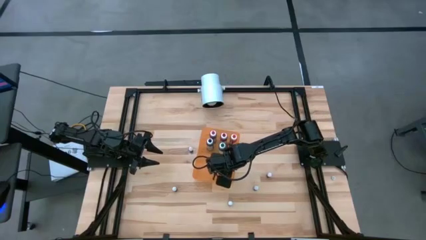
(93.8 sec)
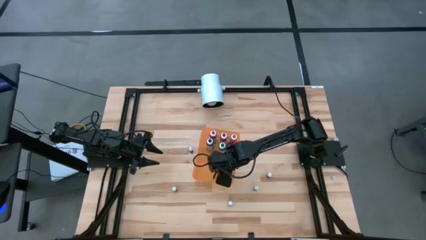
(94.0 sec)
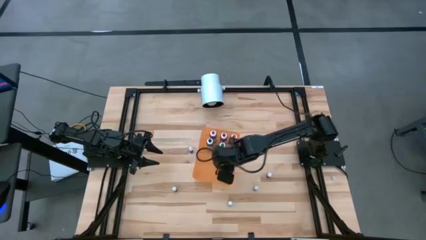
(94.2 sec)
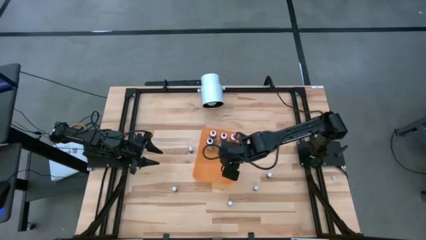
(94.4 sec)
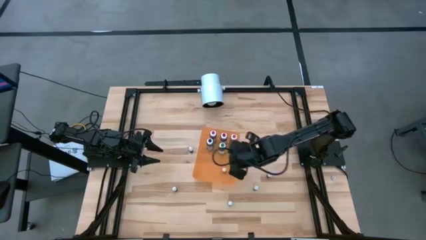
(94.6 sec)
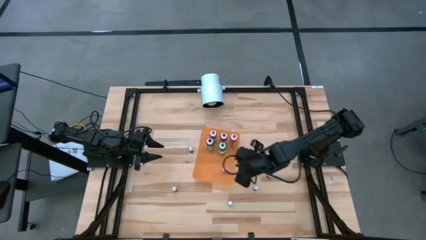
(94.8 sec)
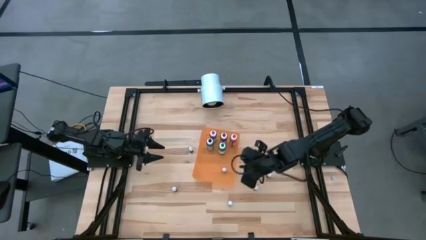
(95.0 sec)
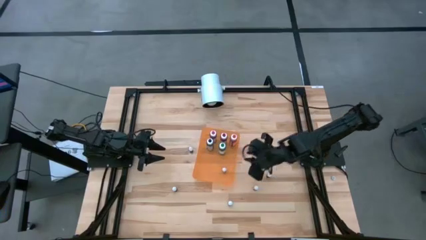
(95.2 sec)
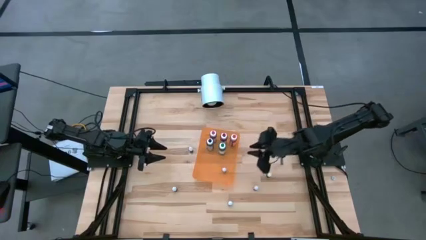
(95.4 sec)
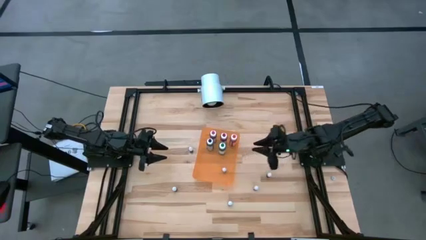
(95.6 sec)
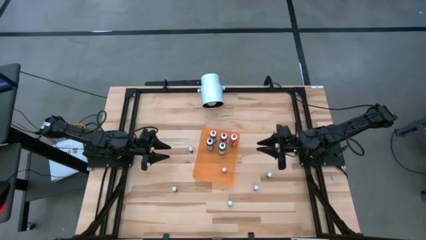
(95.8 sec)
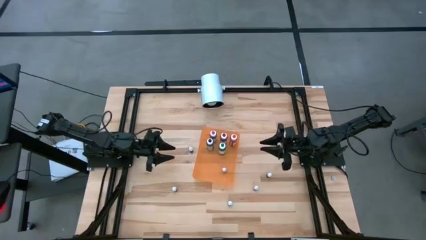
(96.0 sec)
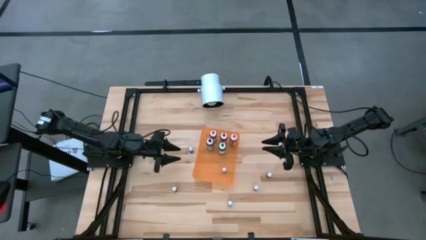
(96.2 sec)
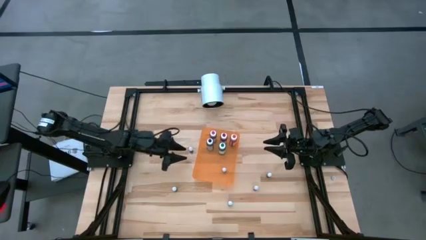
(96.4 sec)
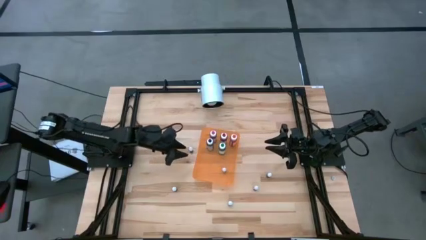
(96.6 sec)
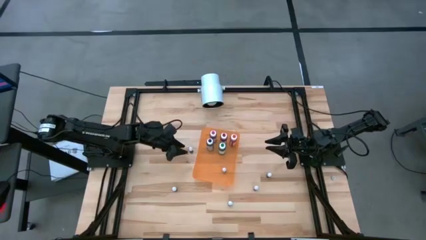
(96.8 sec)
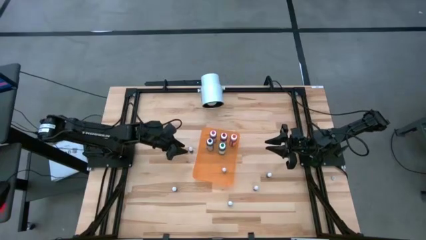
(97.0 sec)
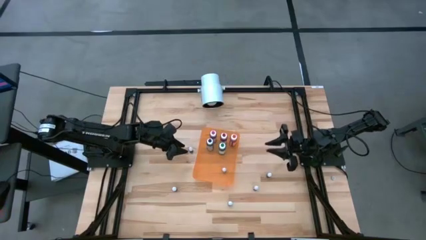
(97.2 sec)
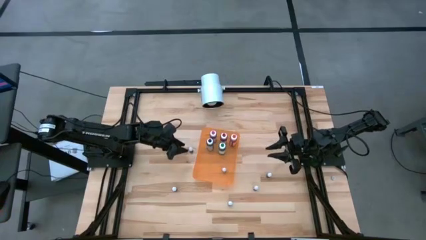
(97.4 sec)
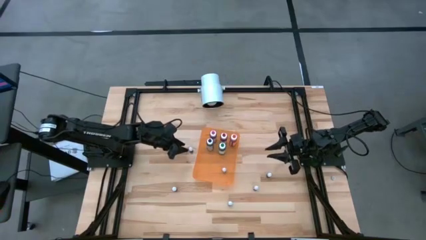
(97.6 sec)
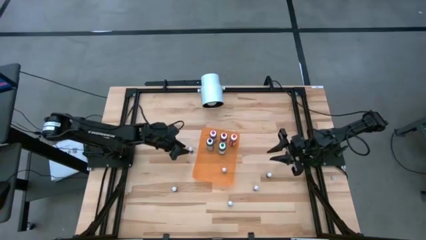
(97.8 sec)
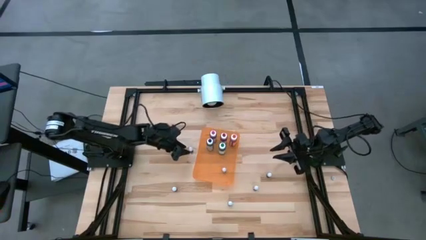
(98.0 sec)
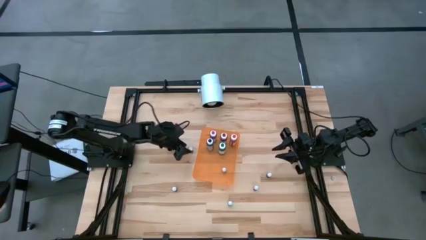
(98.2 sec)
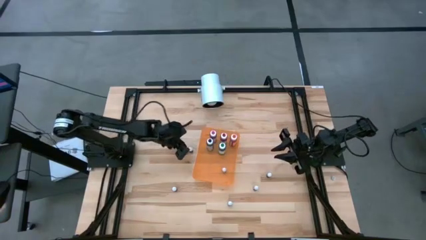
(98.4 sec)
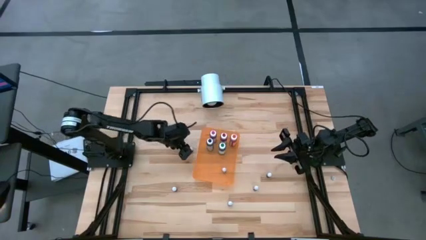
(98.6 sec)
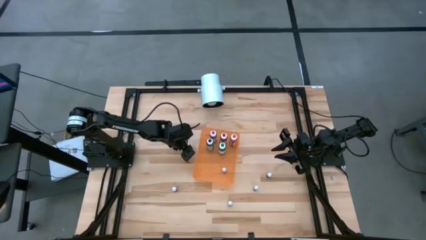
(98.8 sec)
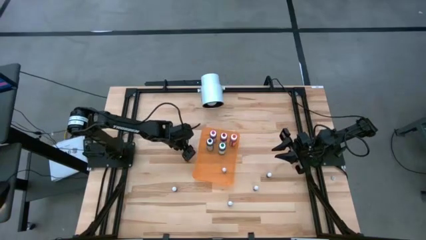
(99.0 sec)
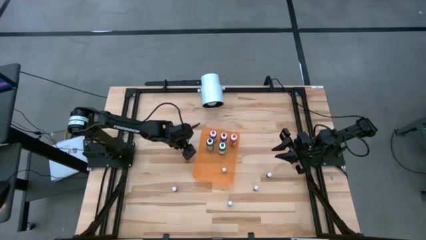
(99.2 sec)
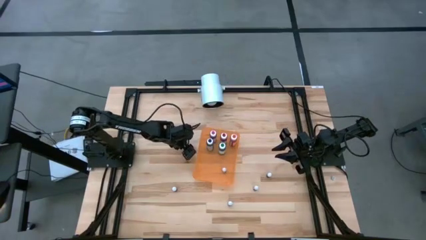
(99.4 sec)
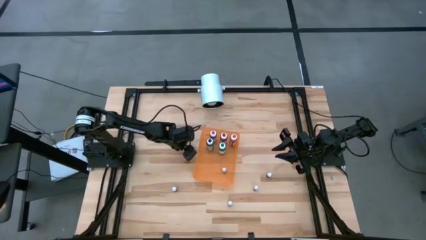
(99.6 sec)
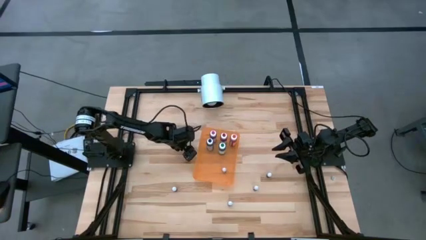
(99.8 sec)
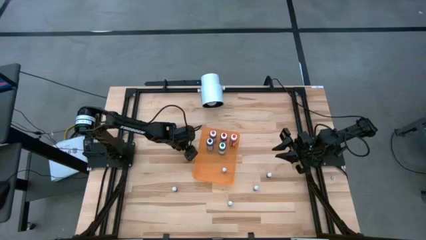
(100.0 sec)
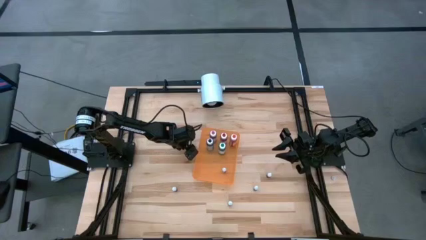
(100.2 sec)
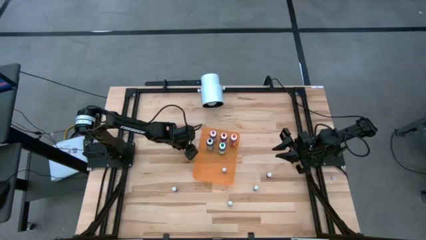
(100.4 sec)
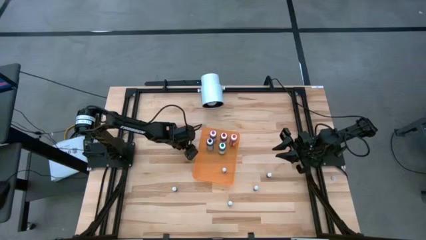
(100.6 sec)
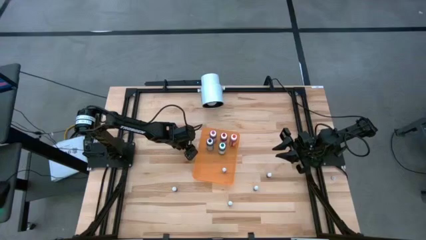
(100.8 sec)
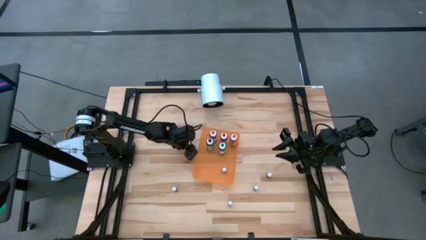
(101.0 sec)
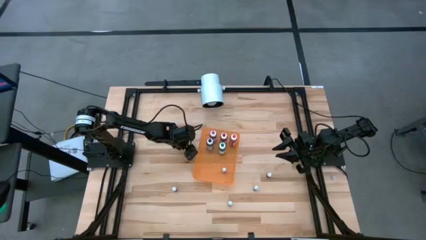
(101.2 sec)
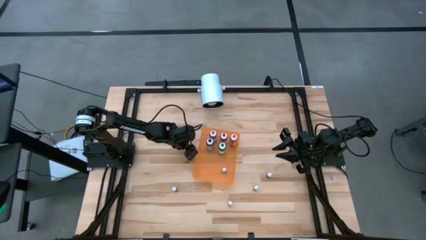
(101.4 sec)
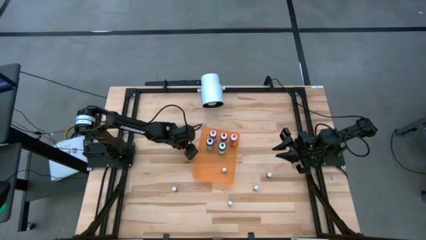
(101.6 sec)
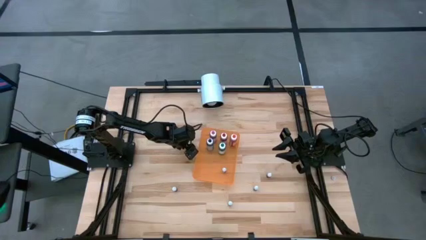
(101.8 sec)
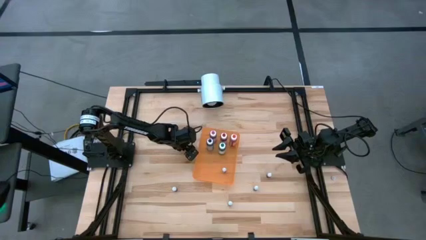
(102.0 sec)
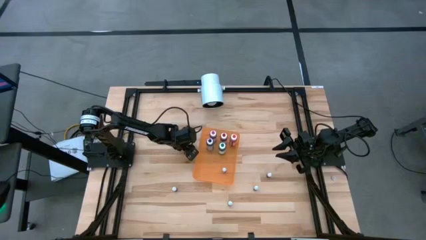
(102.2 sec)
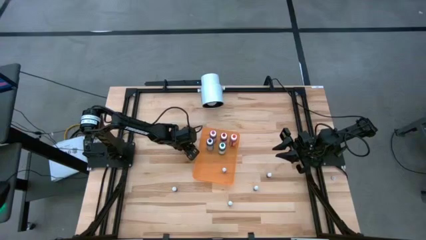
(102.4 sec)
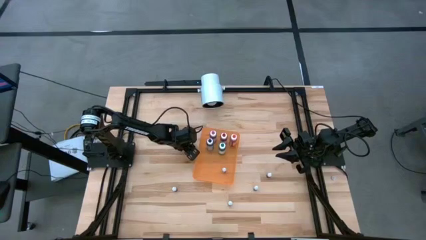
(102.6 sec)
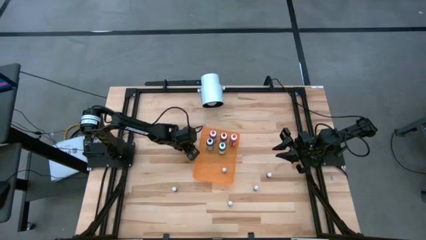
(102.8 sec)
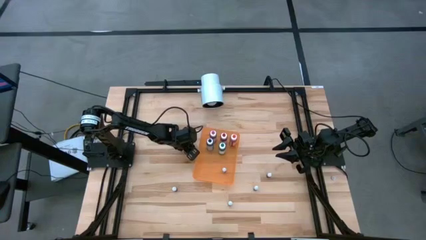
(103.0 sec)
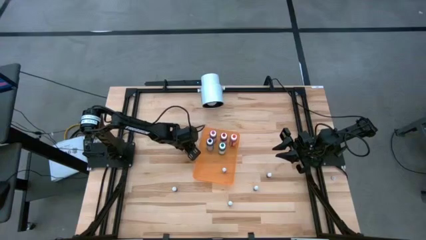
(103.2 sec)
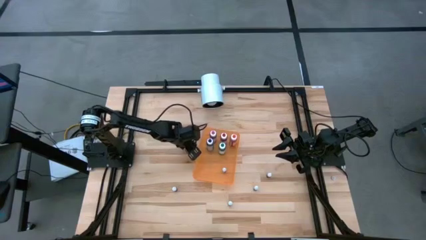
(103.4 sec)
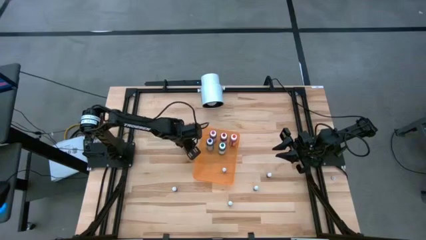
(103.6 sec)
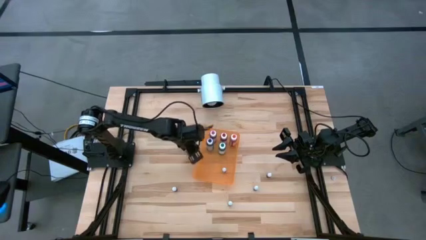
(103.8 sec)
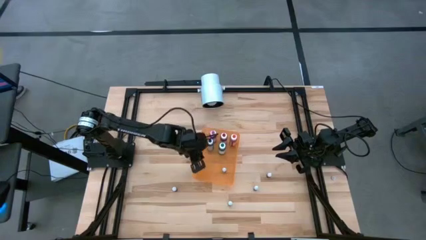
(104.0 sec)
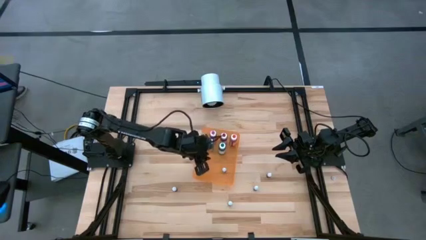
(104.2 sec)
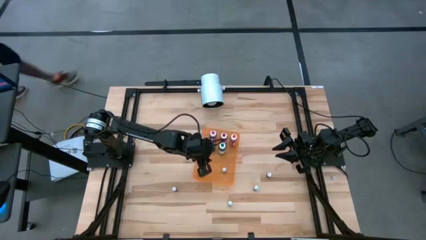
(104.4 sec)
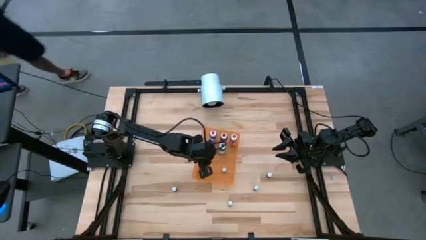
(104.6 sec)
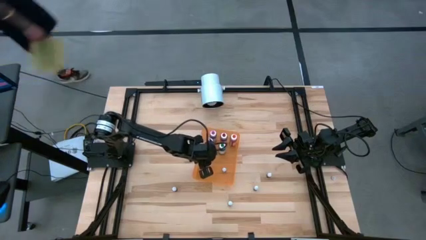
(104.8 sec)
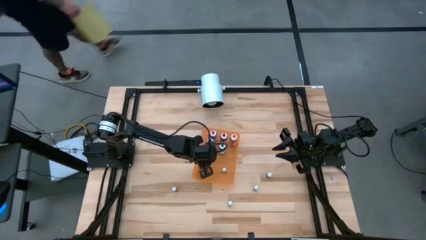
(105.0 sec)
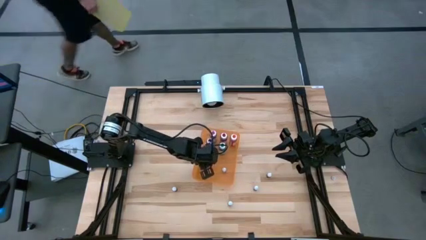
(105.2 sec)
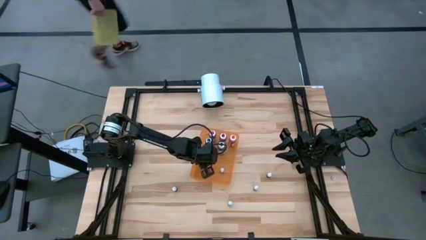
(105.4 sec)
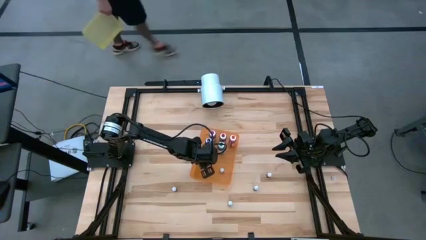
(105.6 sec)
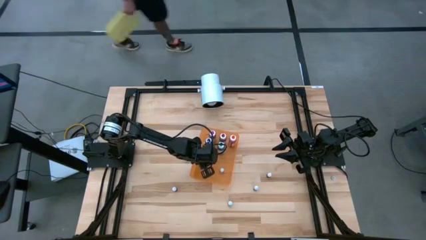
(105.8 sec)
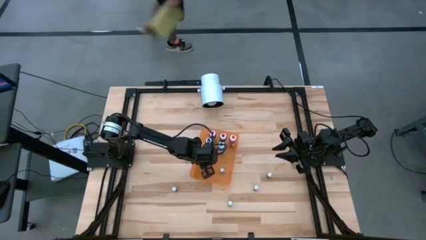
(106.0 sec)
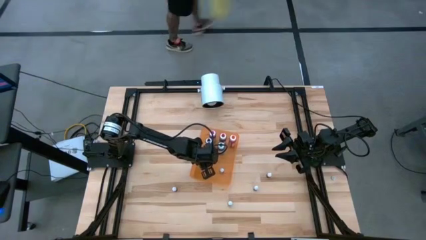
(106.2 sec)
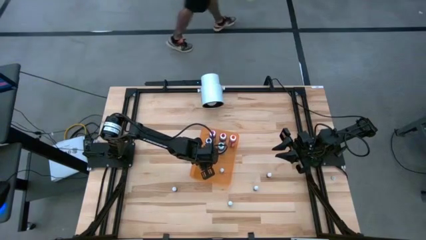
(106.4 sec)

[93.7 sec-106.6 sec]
Task: Pick & Place food coloring
Put the top small black food coloring bottle into the orange bin

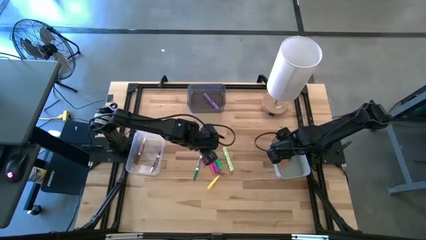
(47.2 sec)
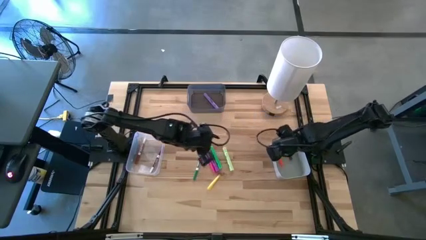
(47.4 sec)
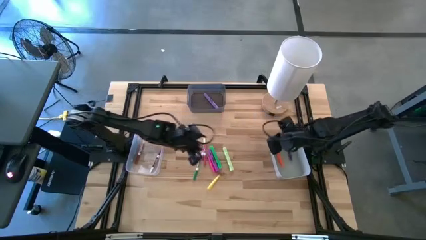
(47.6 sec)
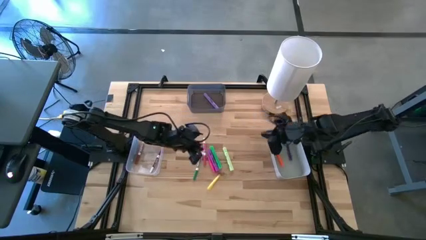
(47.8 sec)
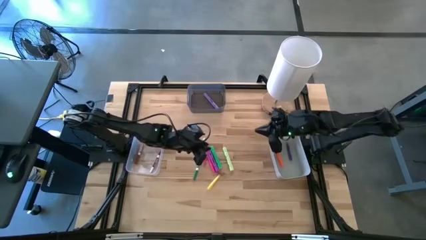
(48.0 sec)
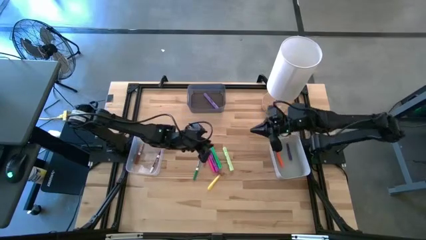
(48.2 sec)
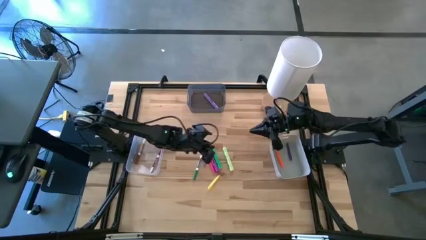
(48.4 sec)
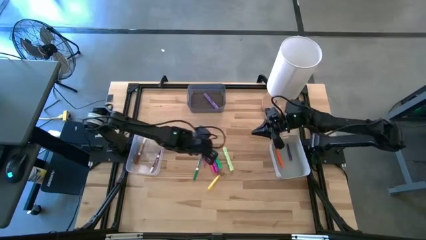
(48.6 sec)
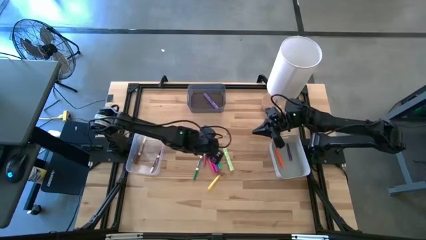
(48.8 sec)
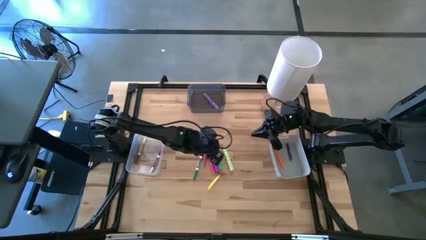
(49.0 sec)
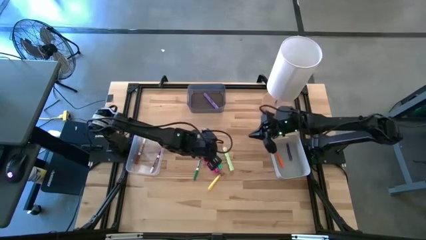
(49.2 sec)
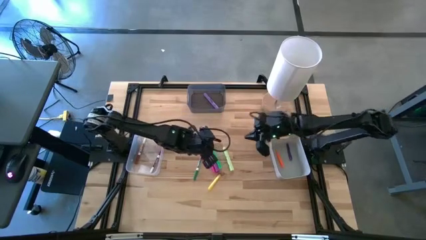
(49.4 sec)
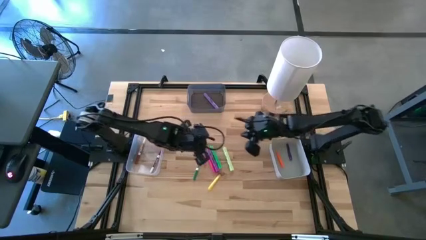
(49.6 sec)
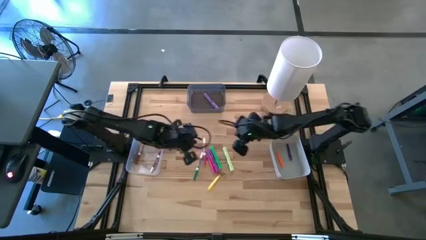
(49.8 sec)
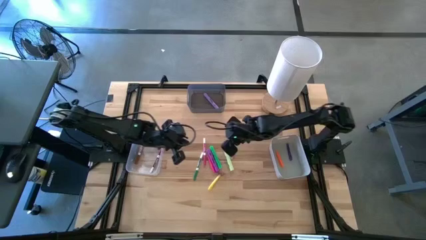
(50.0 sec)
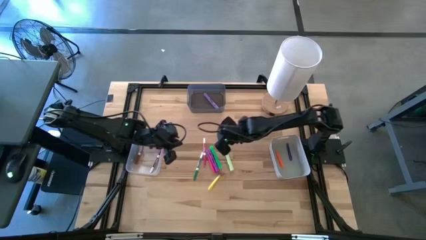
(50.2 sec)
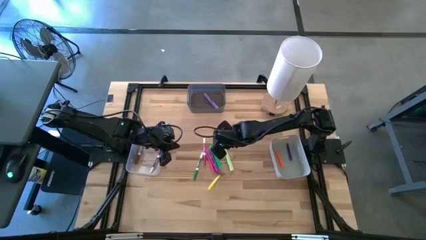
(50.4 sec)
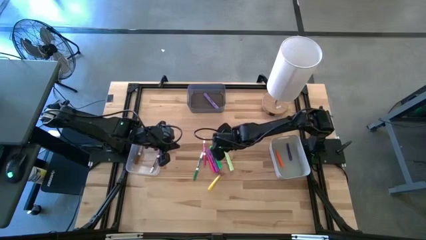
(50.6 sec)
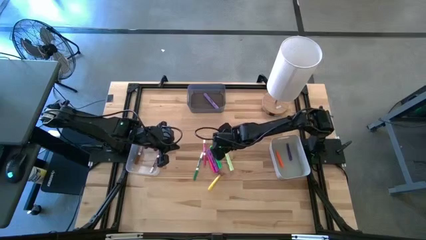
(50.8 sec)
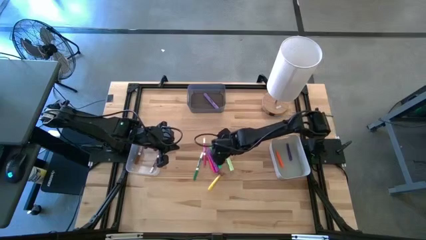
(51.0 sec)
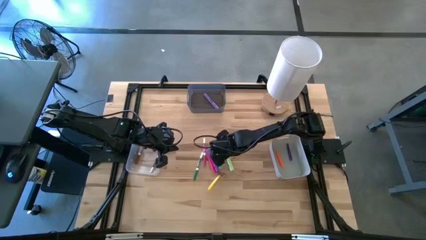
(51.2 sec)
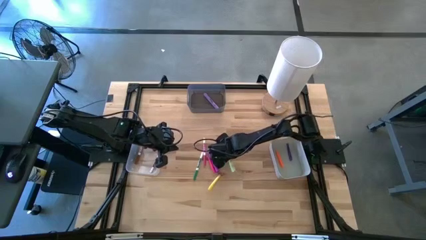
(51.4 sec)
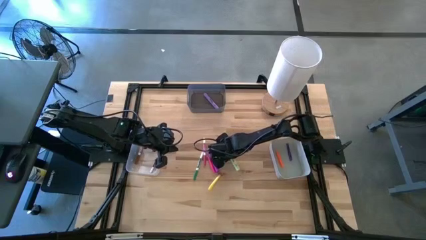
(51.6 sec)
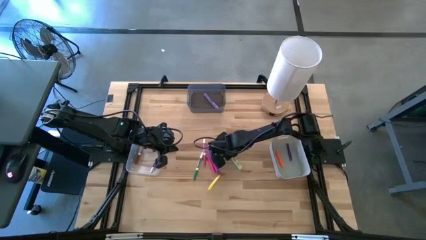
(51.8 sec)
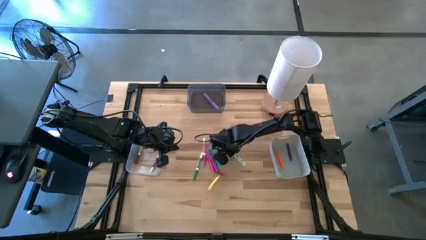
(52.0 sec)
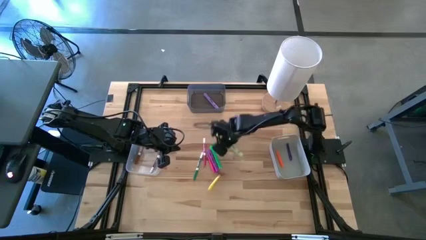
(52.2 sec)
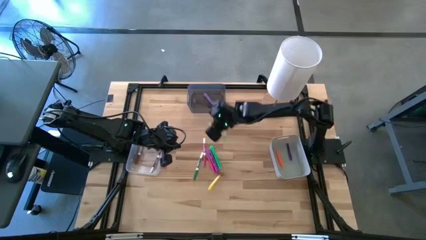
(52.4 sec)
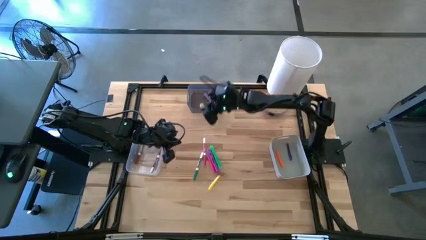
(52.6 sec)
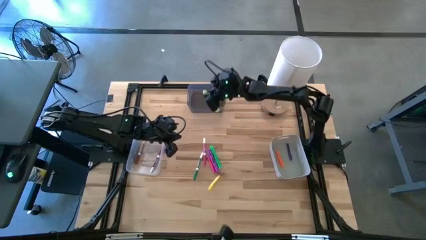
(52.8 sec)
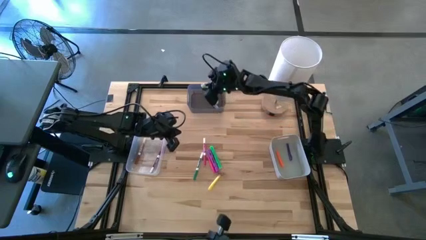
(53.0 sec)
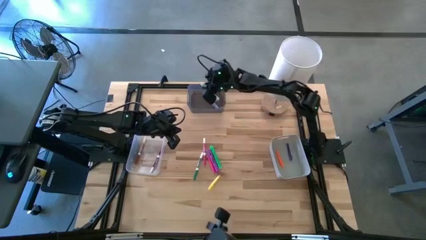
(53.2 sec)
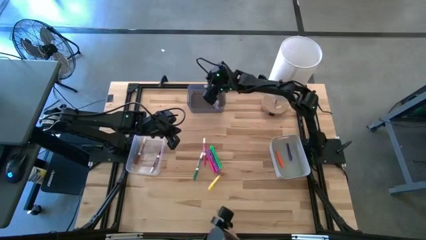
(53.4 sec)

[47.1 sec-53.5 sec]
Task: Pick & Place Markers
Put the light green highlighter into the black bin
